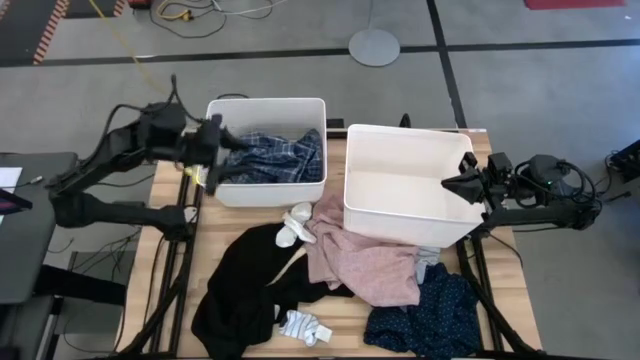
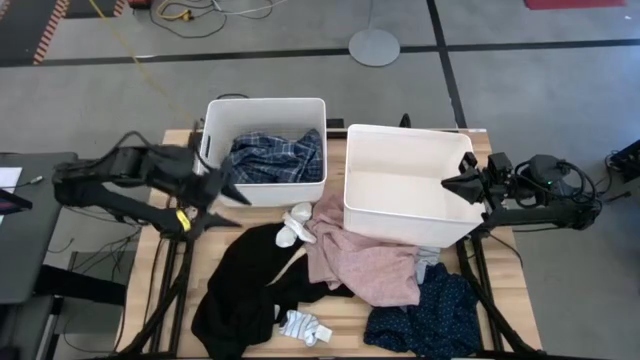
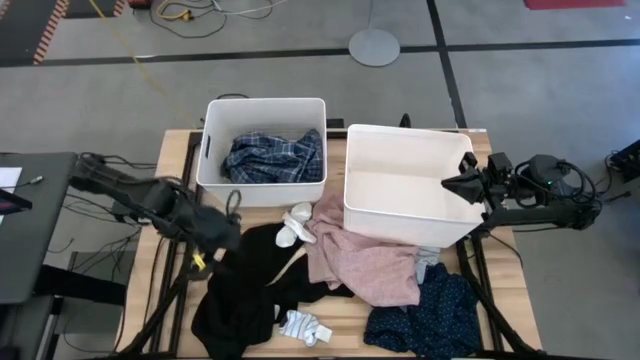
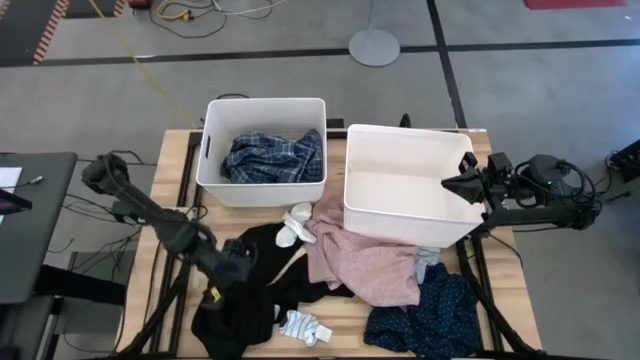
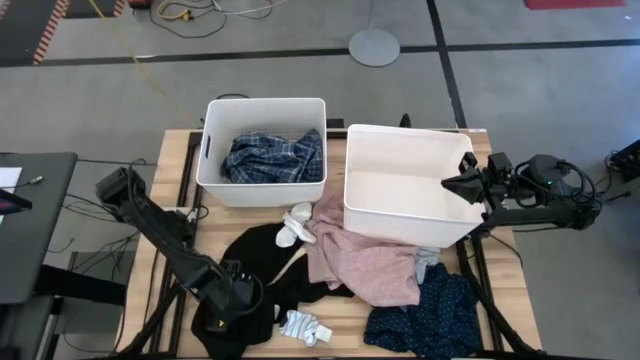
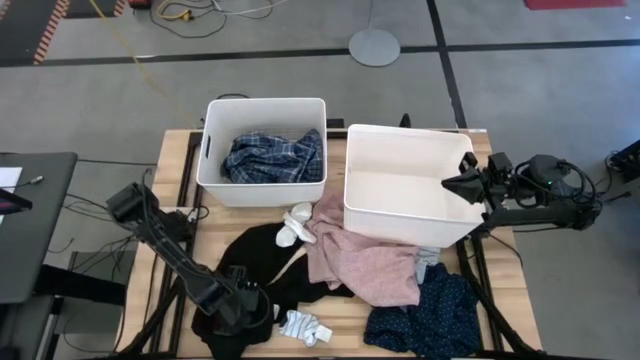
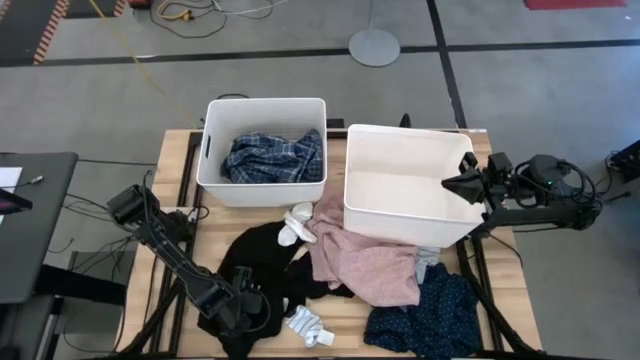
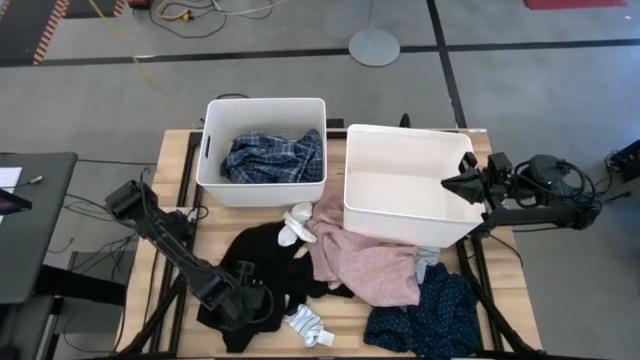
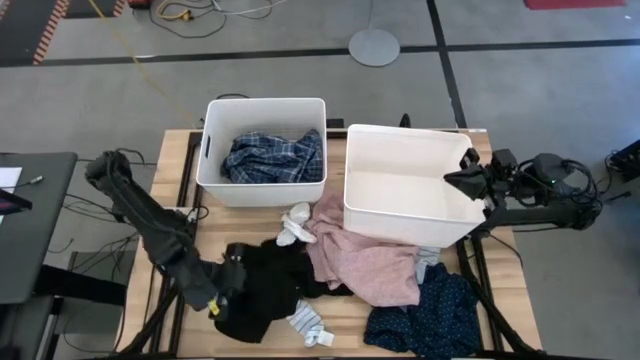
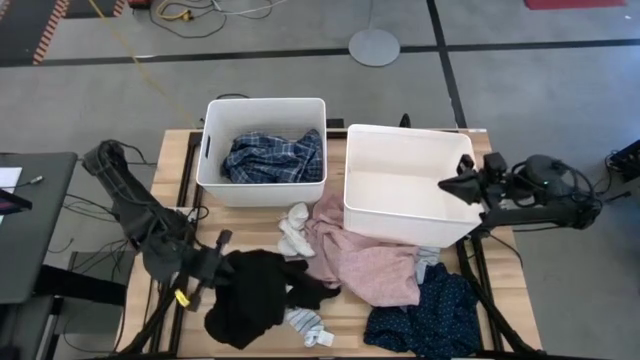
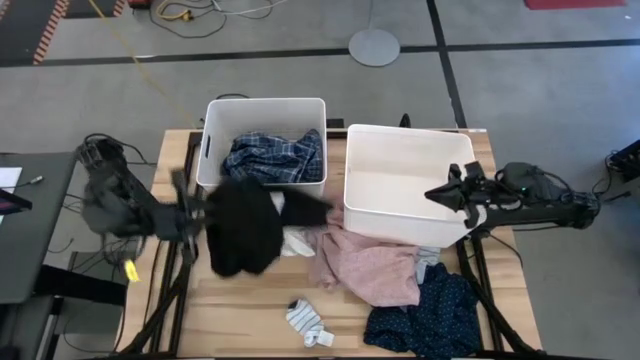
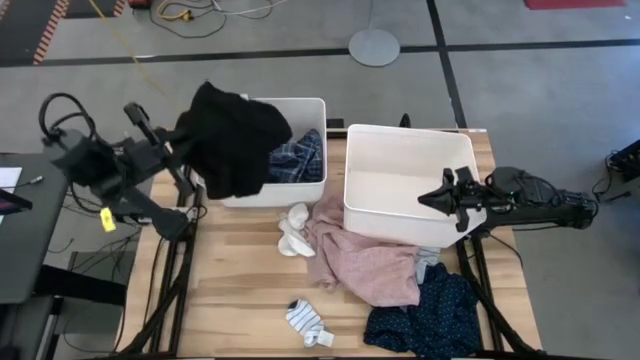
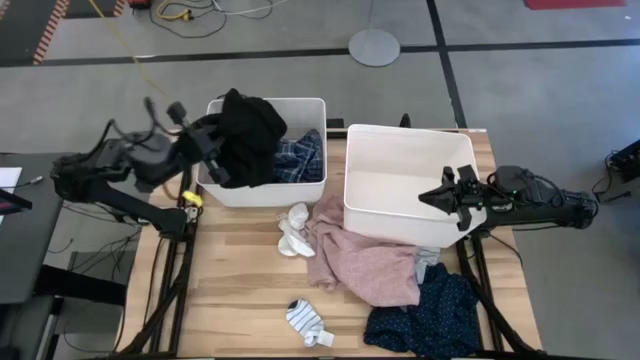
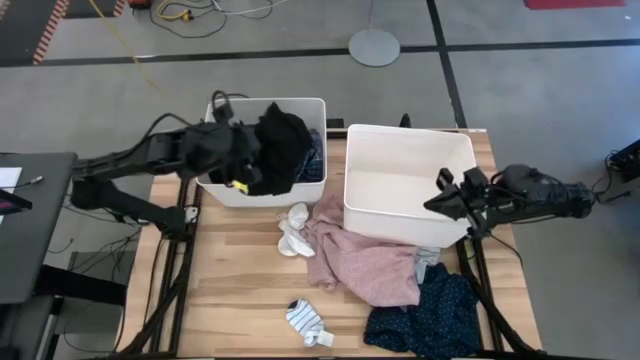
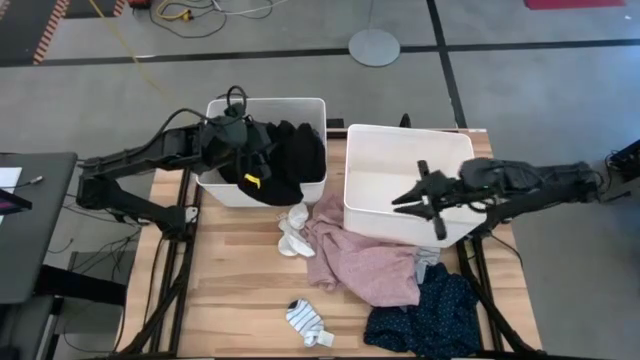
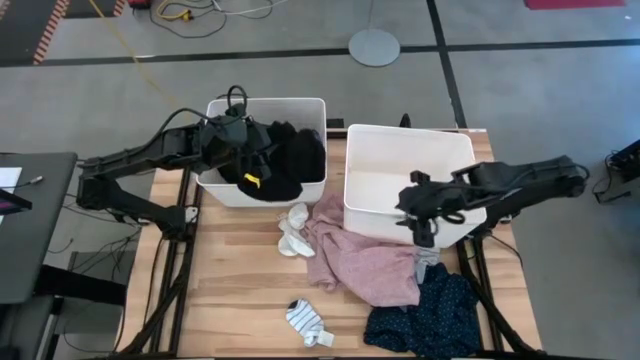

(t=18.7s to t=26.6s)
Task: Sort clothes
Put the black pants into the left white laundry organizer

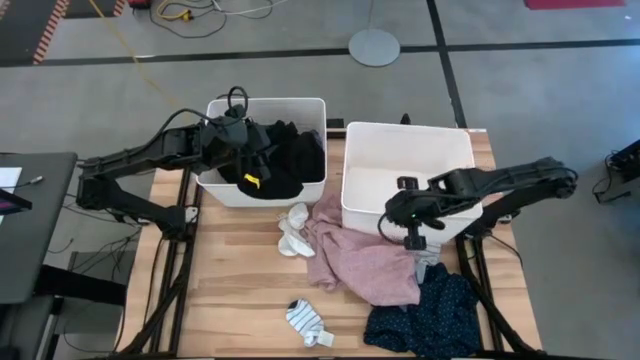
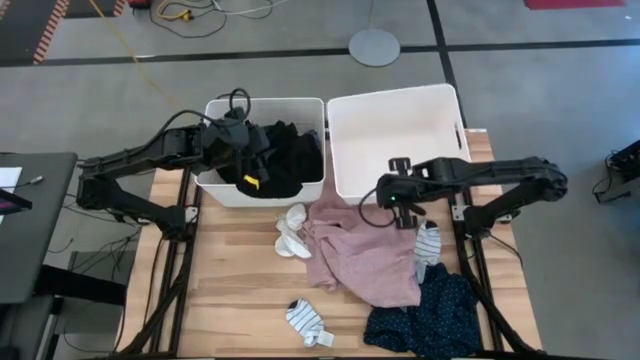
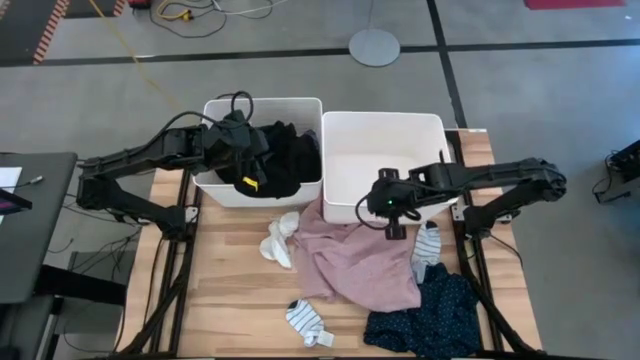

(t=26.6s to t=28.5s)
Adjust the right white laundry organizer

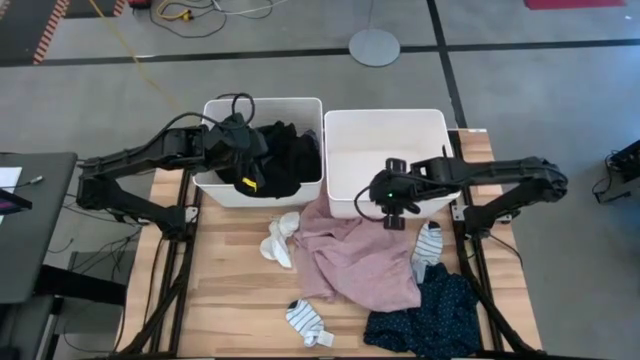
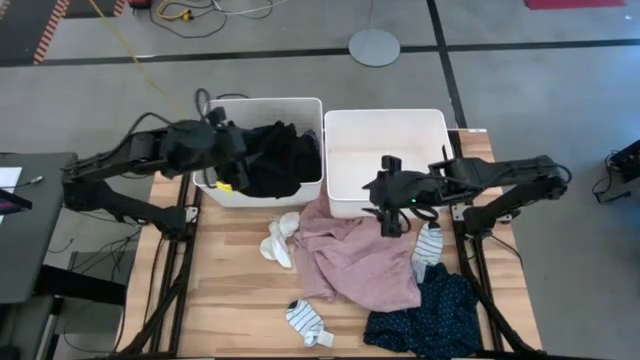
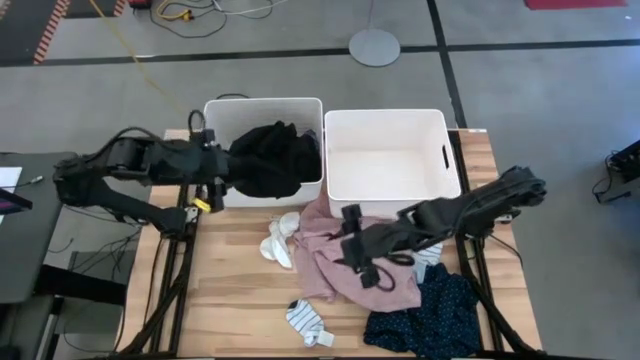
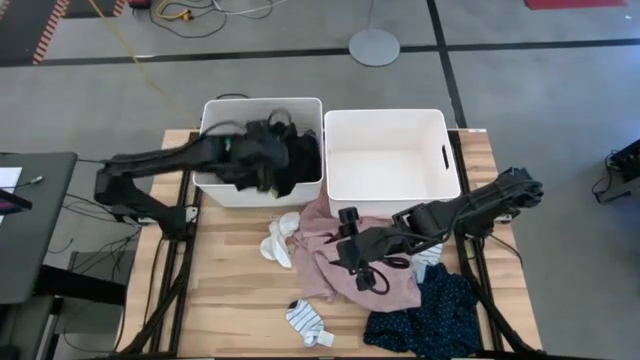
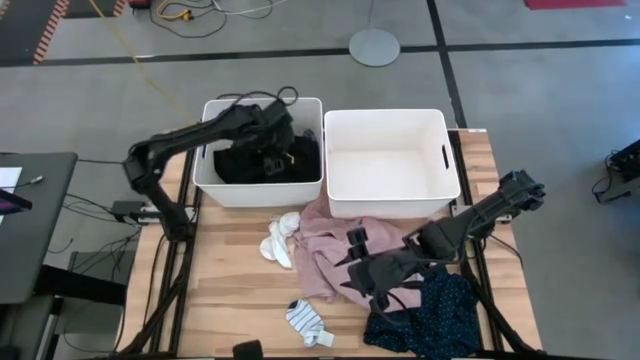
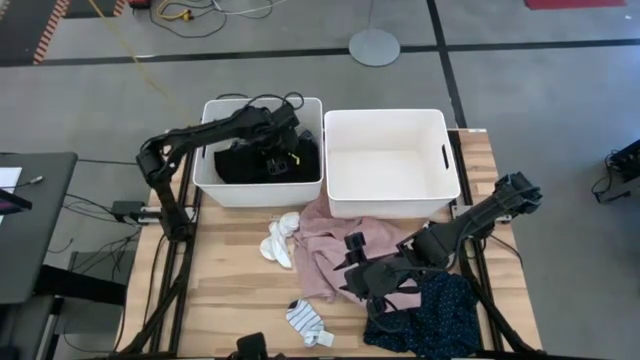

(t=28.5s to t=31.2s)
Adjust the black pants in the left white laundry organizer

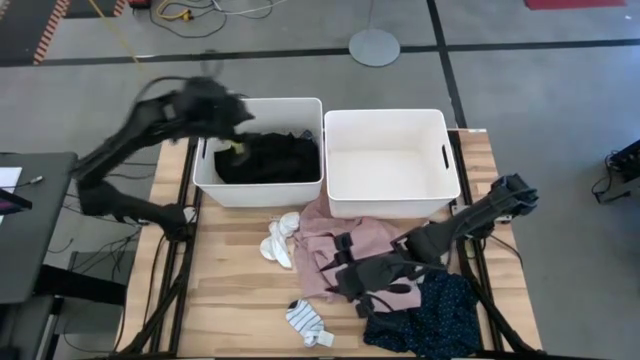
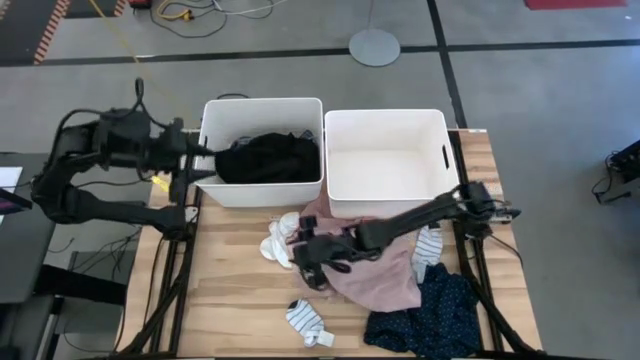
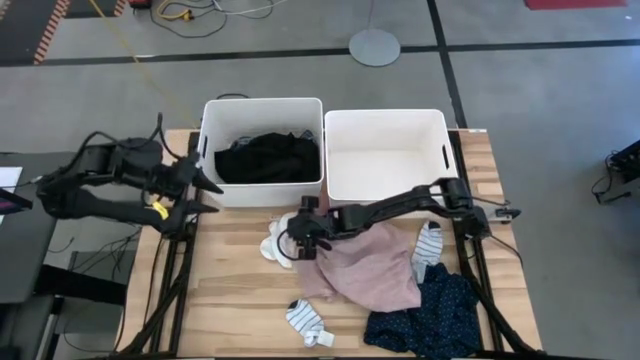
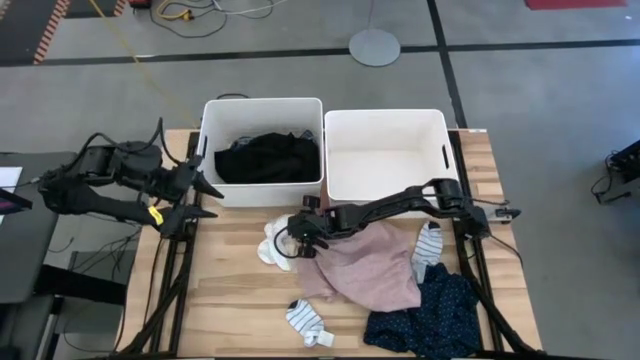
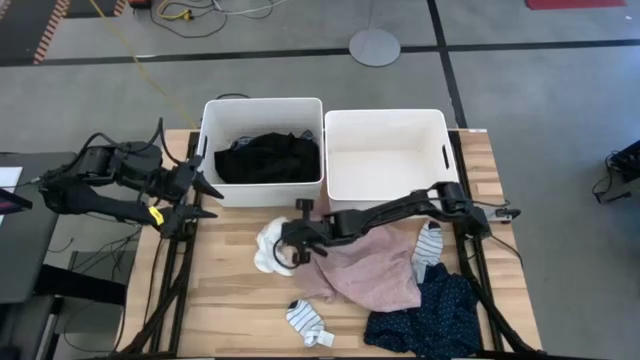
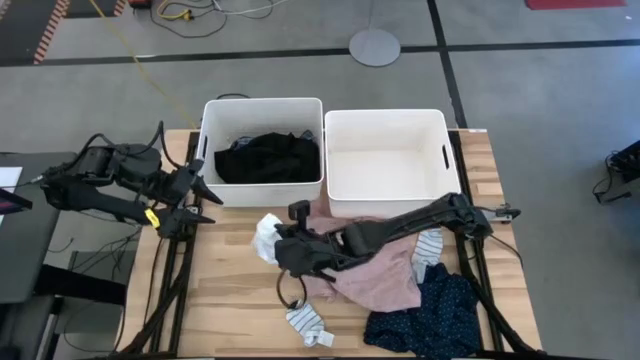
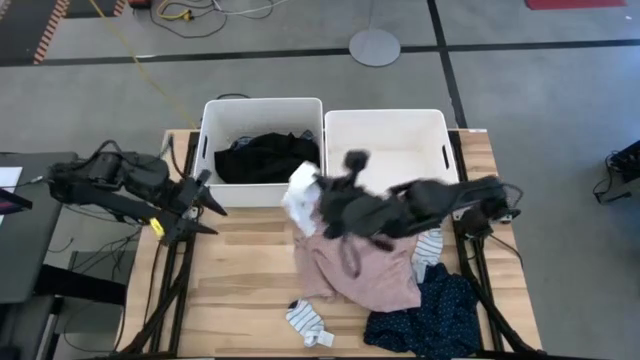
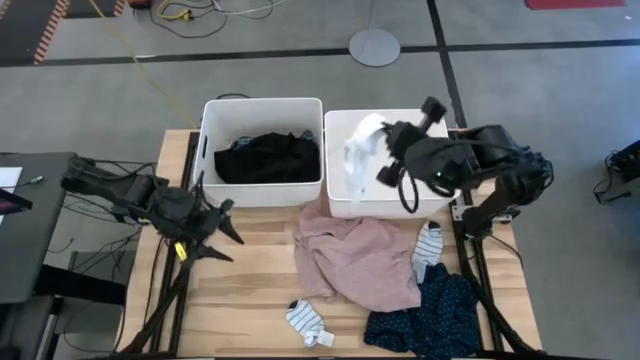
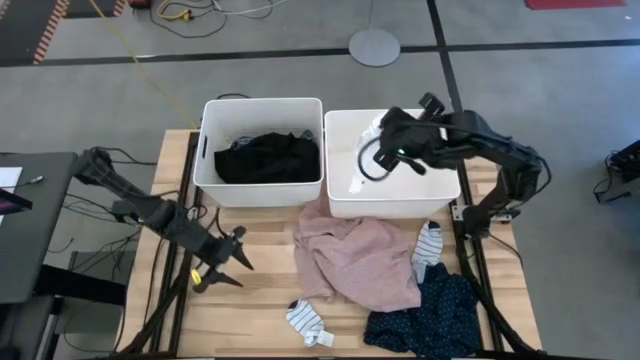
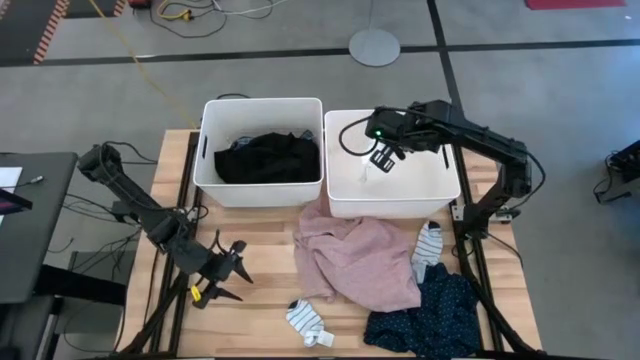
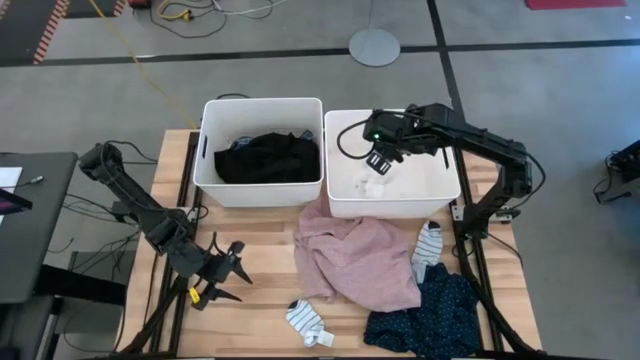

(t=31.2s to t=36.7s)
Put the left white socks into the right white laundry organizer

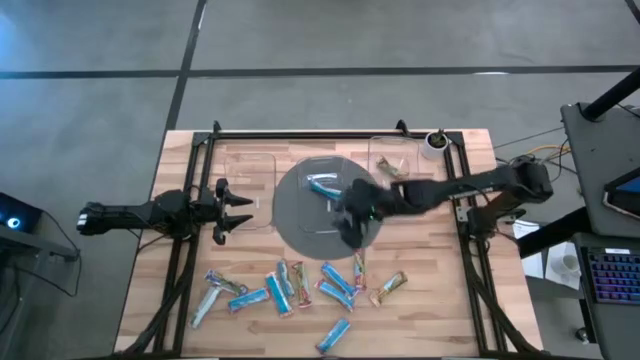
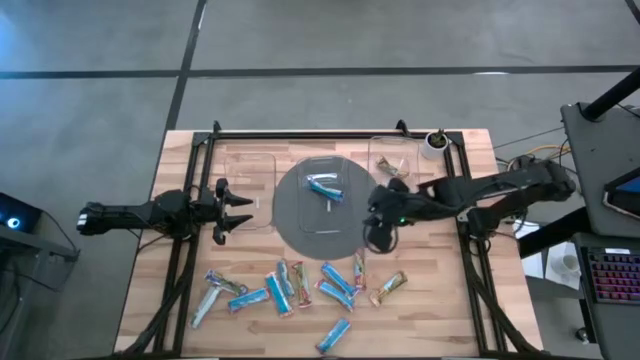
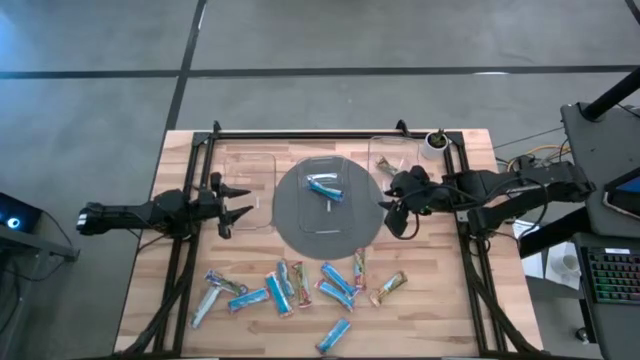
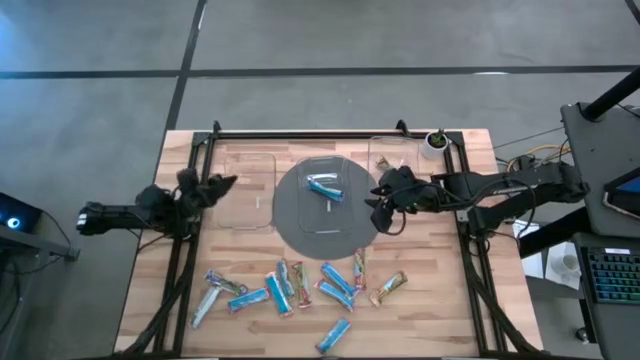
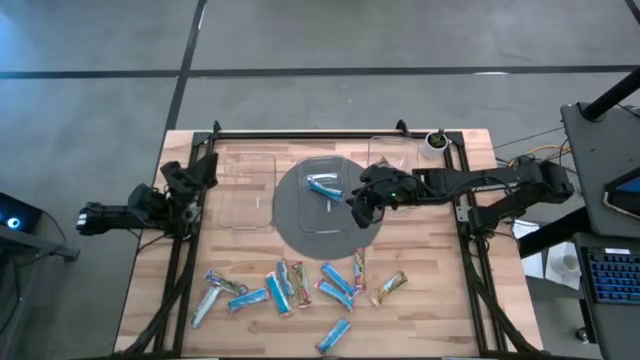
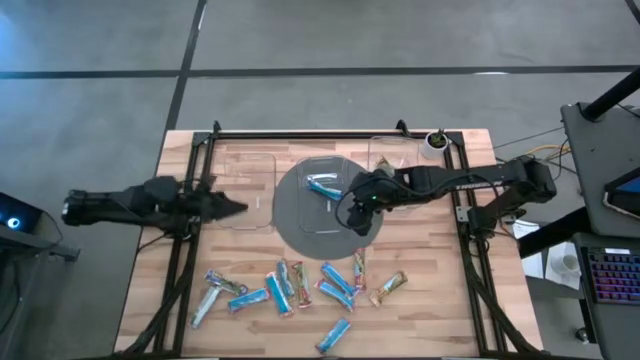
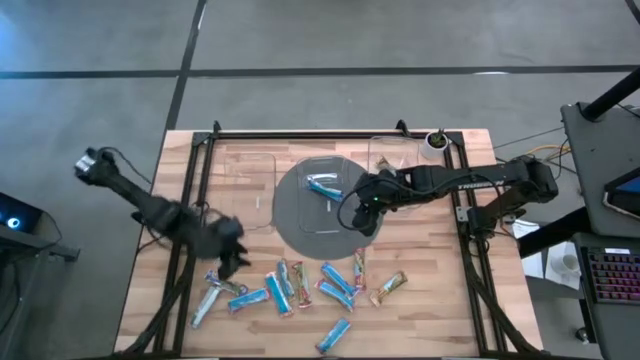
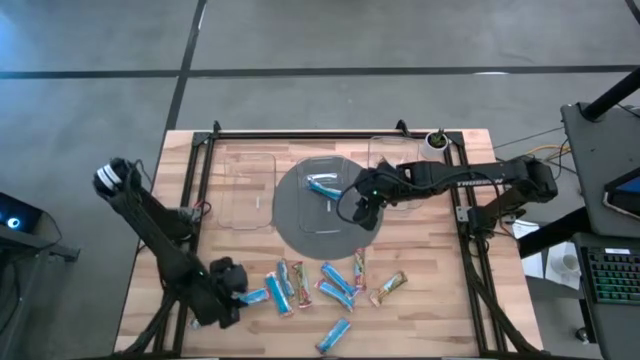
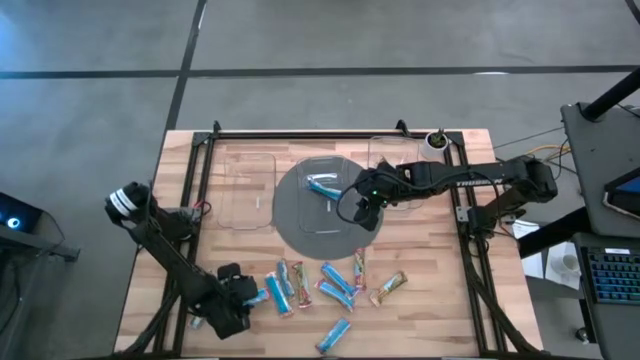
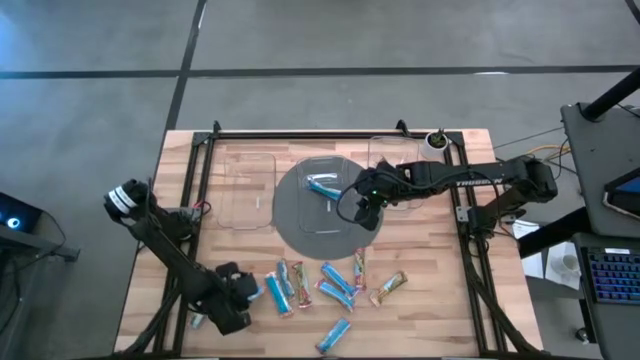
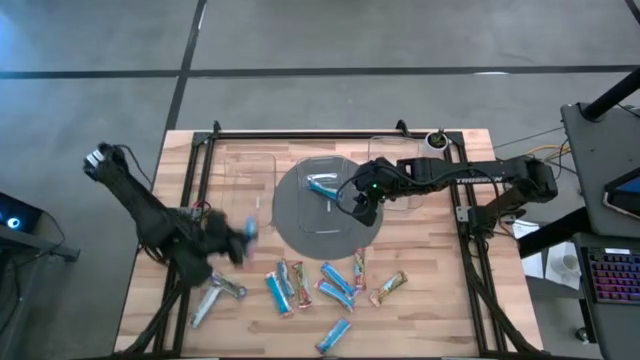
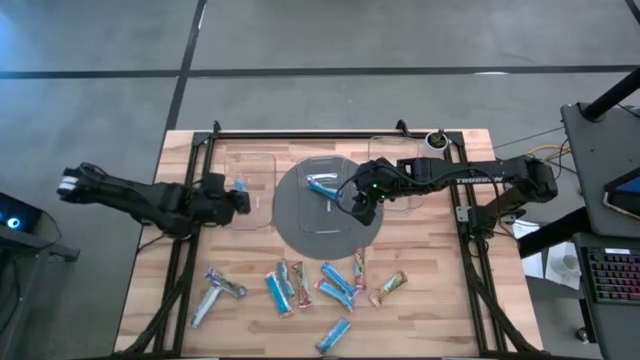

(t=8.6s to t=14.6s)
Task: Pick and place Granola Bars by type
Put the red granola bar into the left transparent bin
